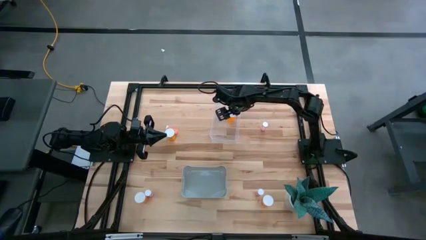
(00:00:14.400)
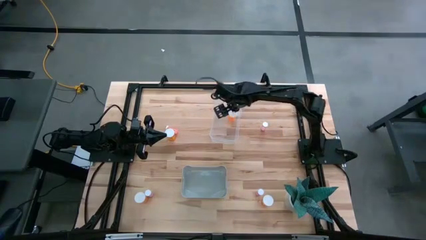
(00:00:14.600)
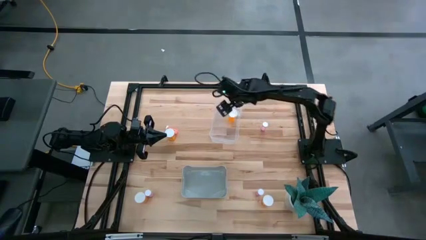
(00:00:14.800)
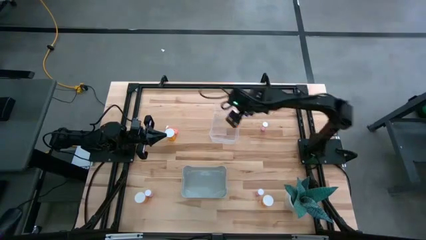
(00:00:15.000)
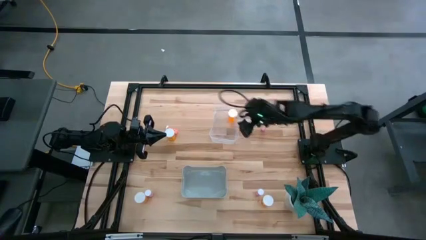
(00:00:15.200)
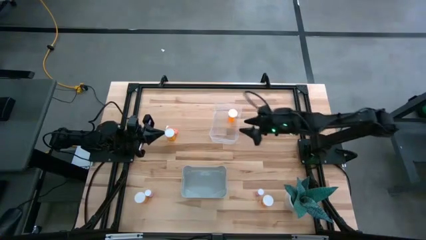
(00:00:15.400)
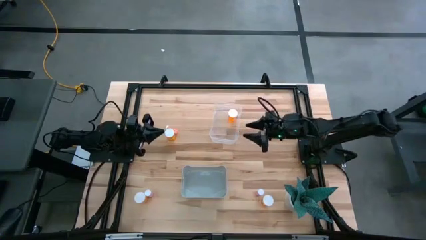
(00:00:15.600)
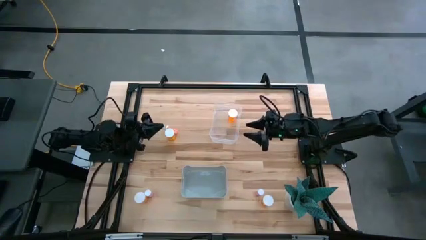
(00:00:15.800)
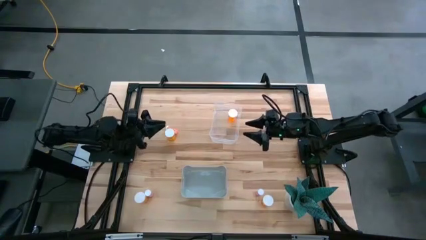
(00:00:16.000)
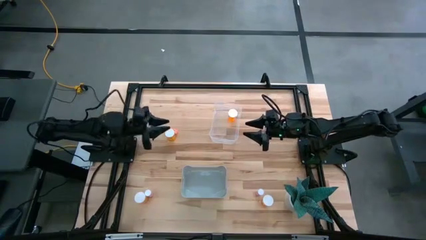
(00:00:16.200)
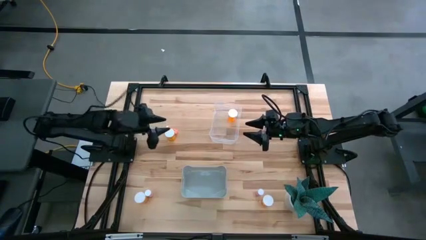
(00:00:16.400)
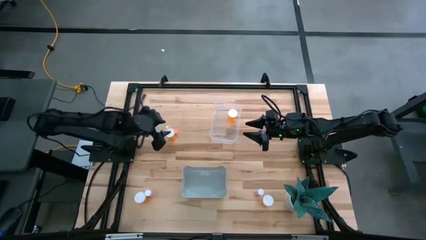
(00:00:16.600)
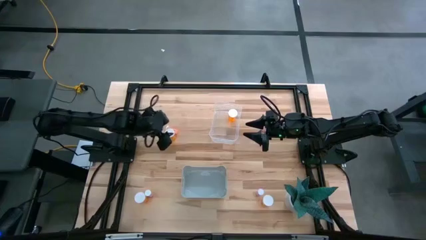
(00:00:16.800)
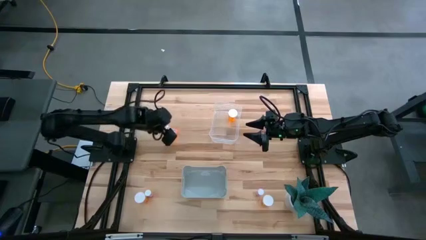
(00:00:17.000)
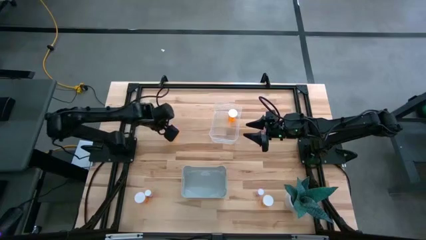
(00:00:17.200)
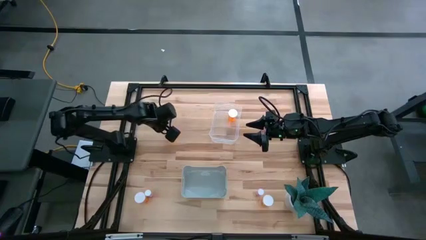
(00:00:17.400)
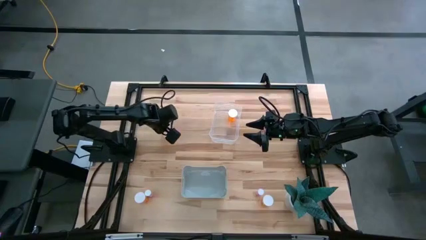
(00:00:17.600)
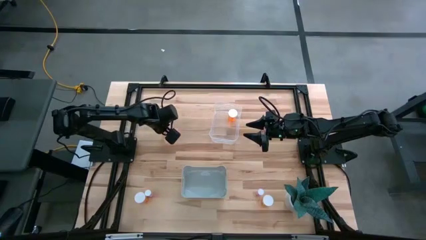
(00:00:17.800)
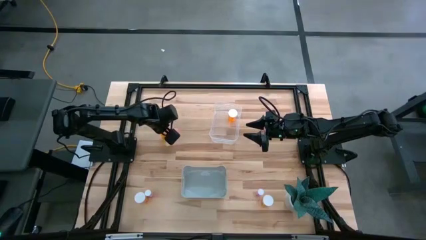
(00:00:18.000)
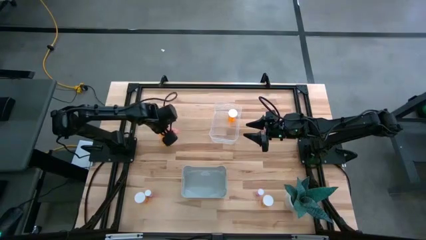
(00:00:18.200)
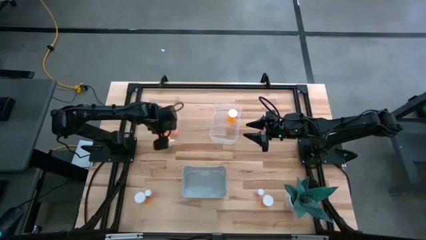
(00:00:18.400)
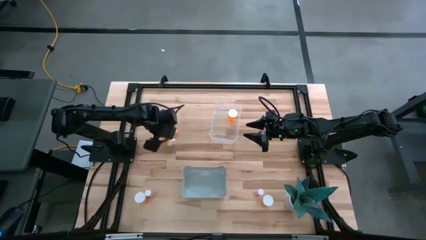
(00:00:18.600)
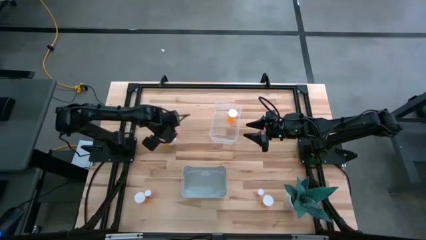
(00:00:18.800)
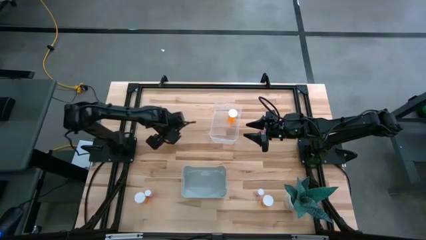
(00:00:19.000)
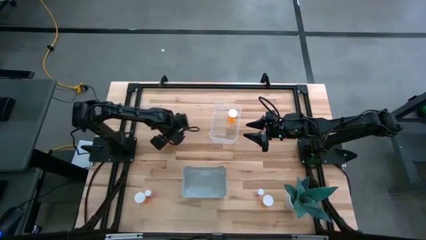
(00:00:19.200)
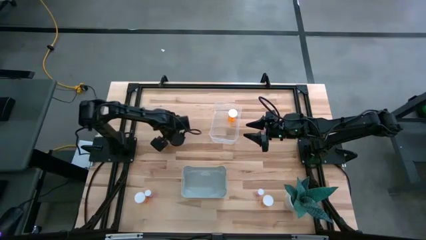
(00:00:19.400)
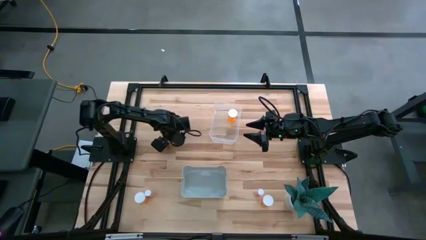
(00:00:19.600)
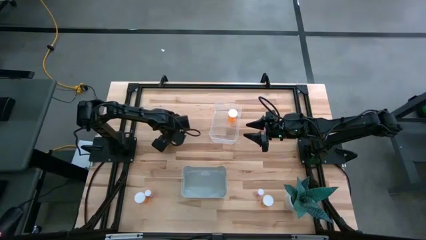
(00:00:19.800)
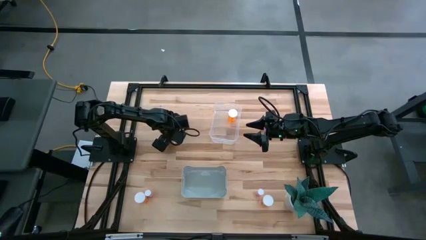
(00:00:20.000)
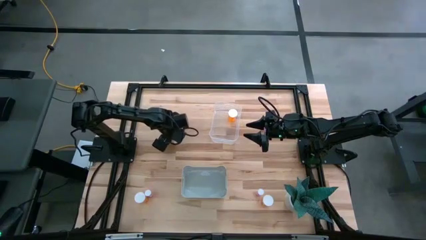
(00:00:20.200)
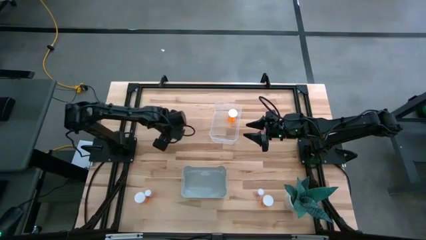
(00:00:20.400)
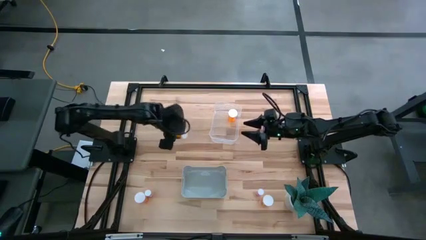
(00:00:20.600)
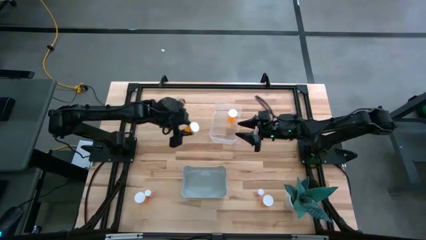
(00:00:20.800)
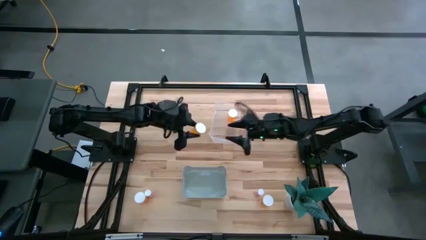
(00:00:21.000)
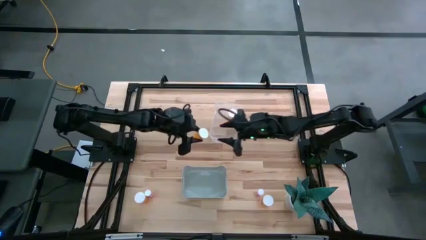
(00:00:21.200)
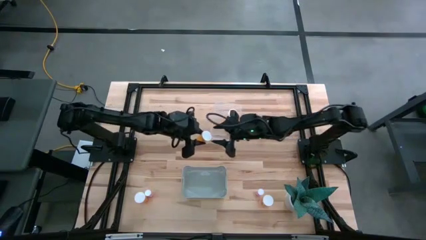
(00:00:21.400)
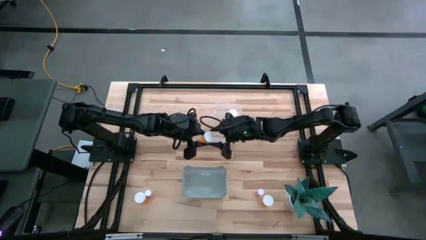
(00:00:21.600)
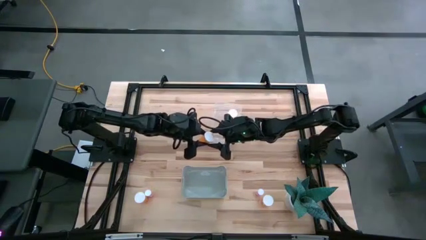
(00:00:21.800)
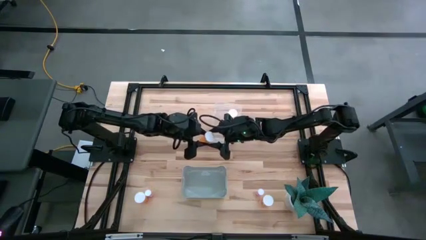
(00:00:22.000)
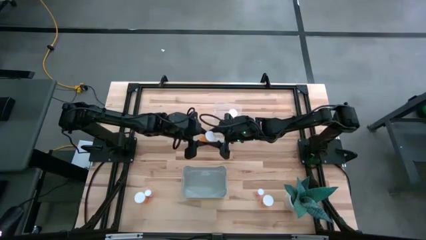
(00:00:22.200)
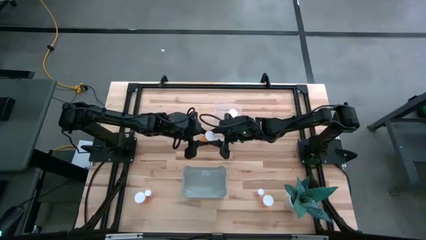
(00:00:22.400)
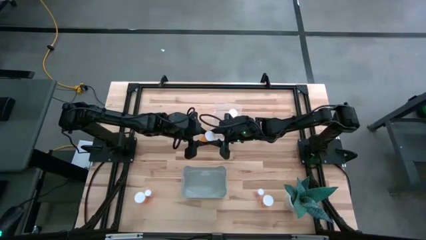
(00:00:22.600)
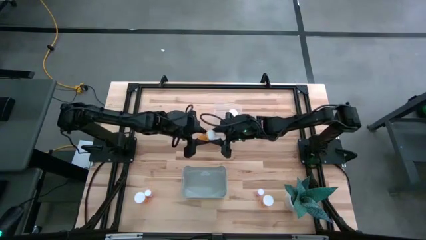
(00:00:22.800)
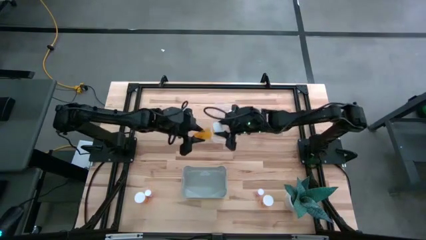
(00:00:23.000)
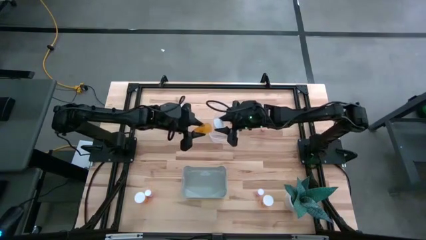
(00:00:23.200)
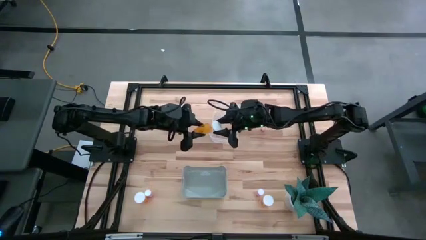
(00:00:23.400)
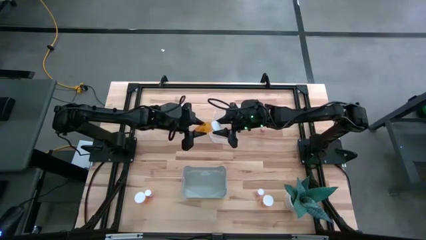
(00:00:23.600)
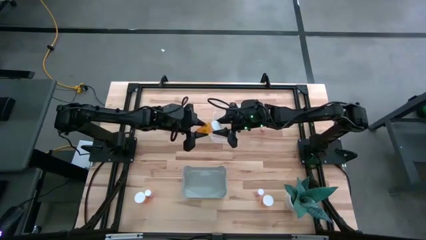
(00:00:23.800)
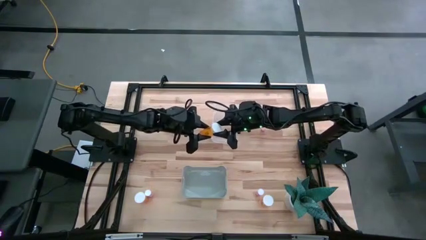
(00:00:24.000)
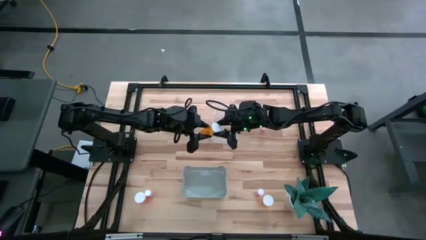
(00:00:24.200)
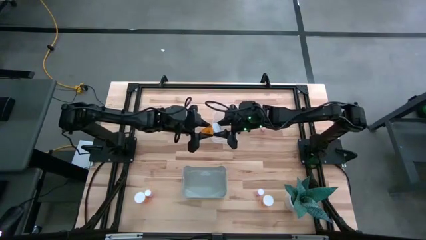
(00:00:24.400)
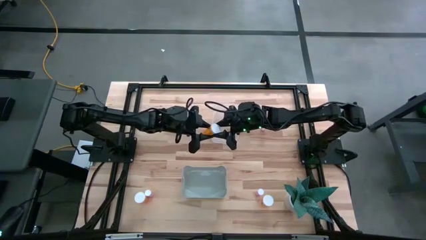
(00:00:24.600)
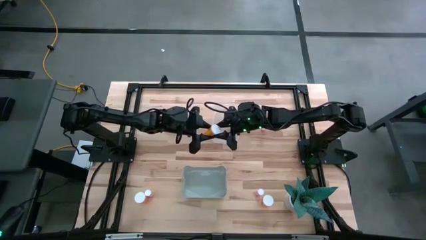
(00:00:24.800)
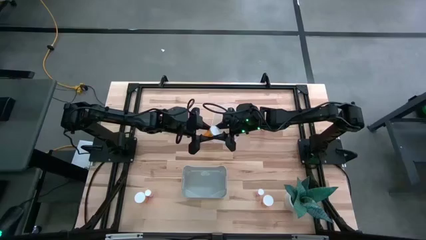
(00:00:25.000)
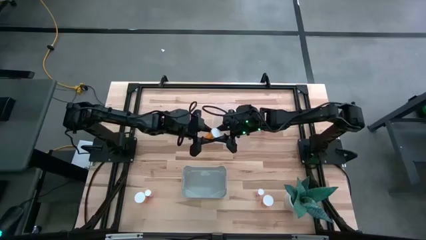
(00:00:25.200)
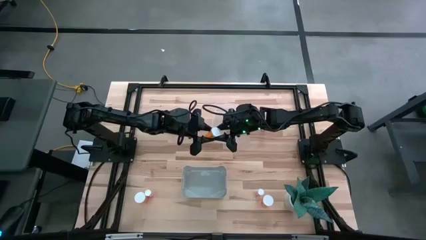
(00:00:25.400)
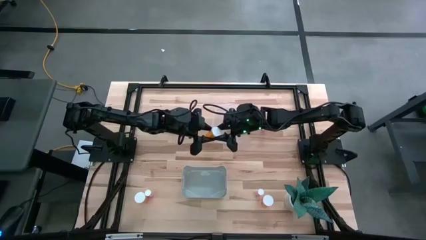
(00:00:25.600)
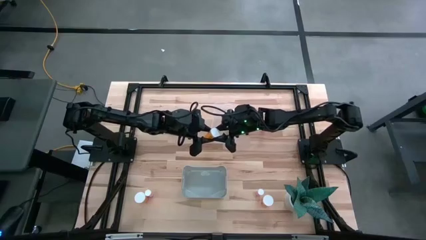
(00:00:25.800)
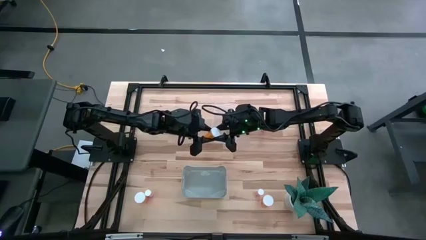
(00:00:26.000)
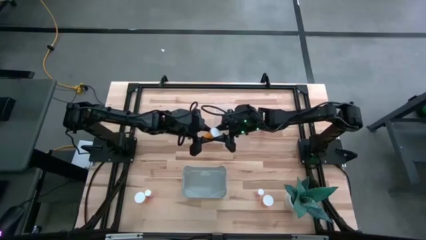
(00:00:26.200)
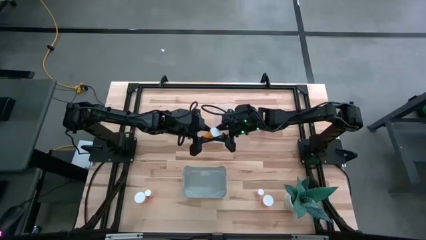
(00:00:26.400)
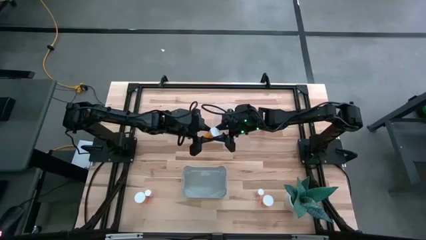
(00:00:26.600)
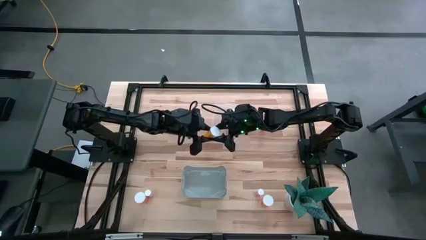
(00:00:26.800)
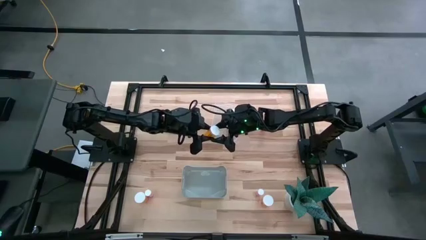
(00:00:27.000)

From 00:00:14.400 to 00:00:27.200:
Task: Pick and place medicine bottles into bin by pill shape (circle, oval)
Put the top left orange pill bottle into the transparent bin
